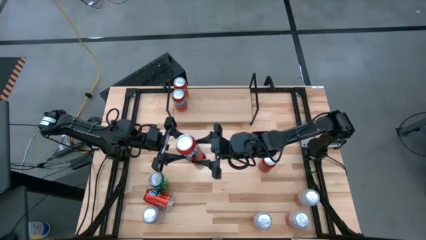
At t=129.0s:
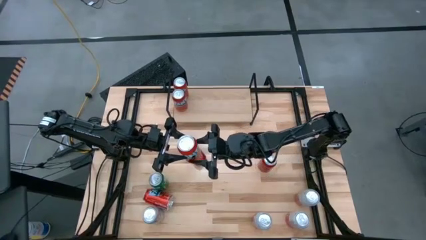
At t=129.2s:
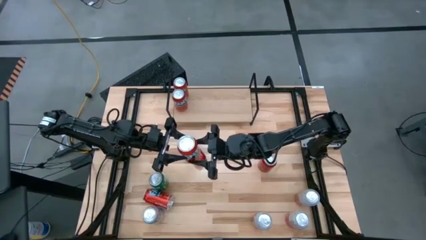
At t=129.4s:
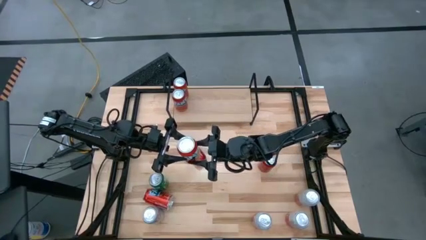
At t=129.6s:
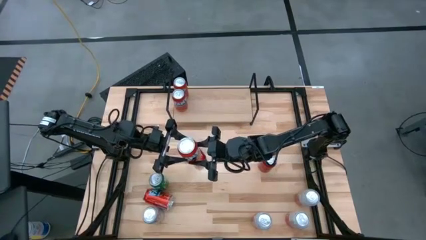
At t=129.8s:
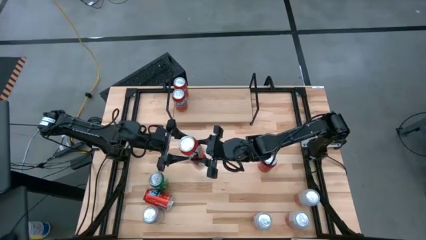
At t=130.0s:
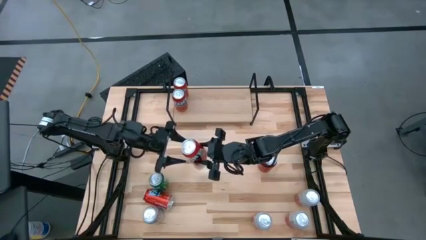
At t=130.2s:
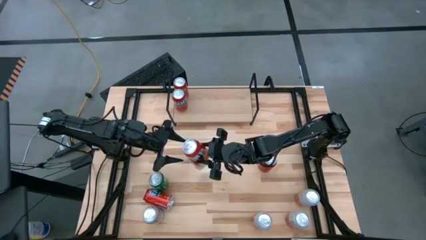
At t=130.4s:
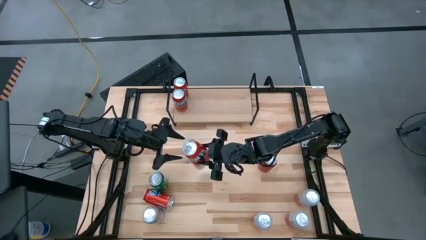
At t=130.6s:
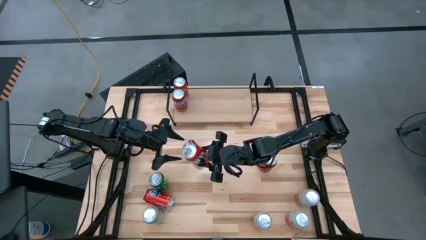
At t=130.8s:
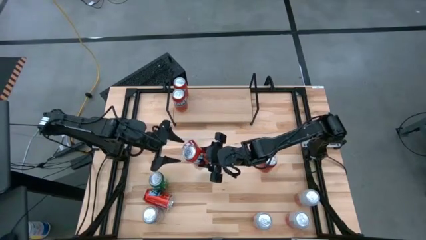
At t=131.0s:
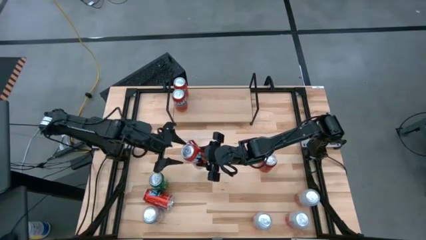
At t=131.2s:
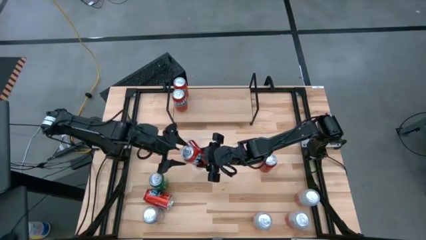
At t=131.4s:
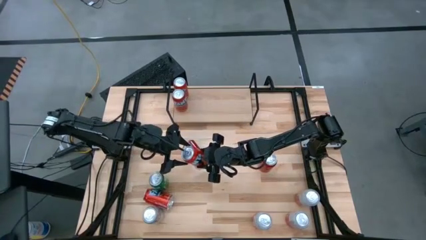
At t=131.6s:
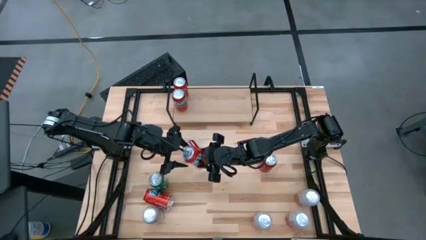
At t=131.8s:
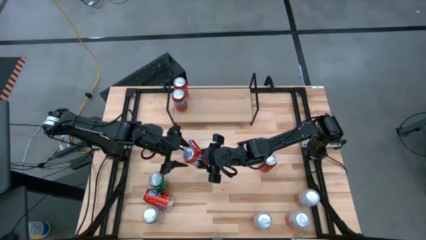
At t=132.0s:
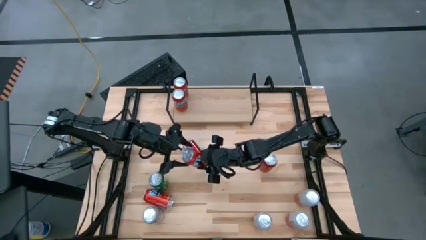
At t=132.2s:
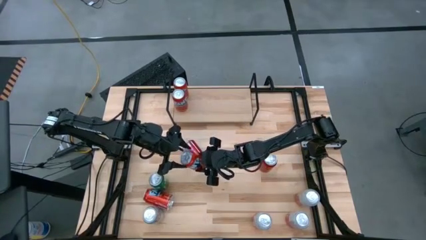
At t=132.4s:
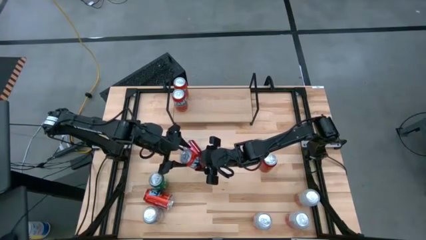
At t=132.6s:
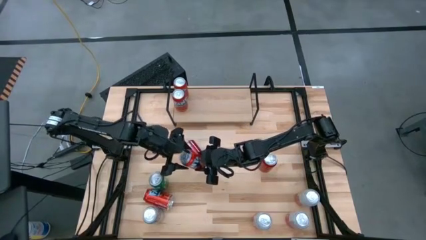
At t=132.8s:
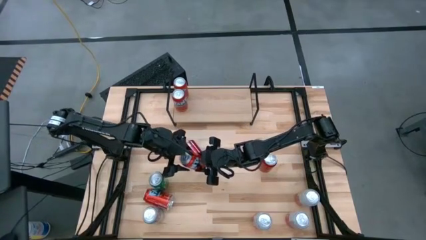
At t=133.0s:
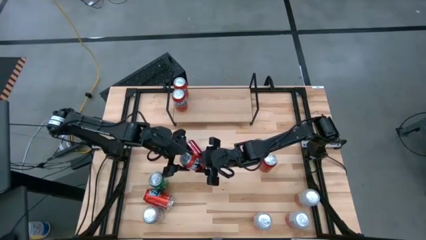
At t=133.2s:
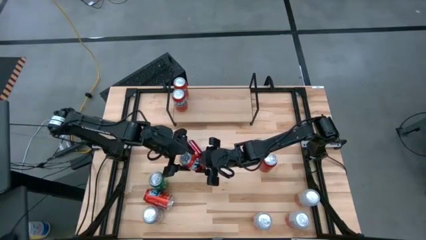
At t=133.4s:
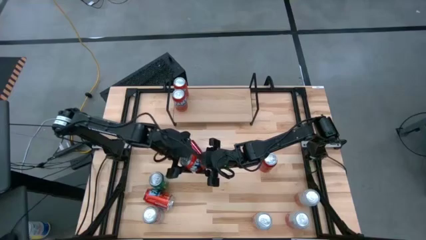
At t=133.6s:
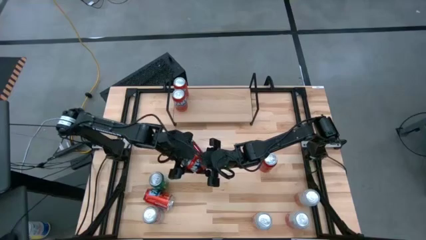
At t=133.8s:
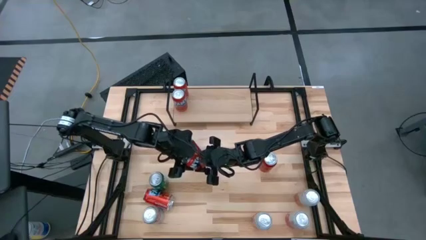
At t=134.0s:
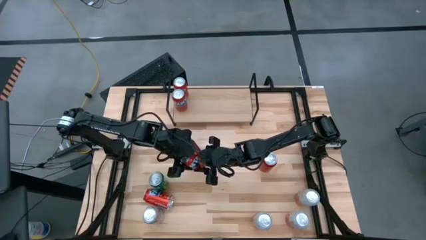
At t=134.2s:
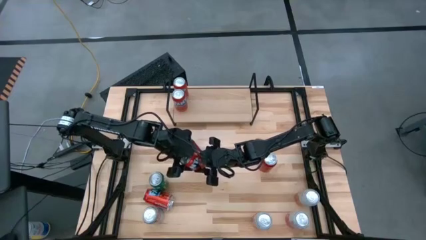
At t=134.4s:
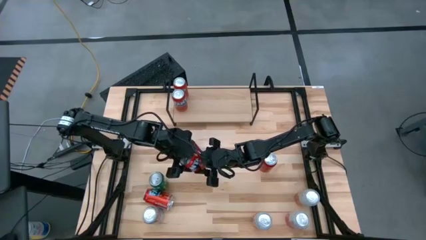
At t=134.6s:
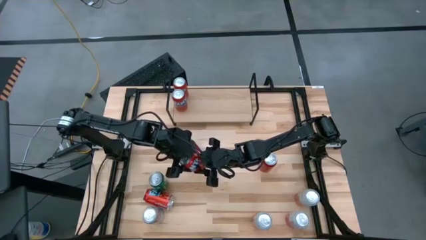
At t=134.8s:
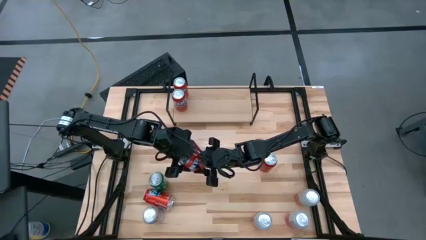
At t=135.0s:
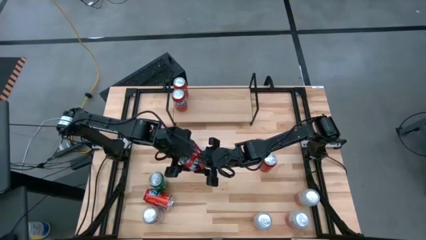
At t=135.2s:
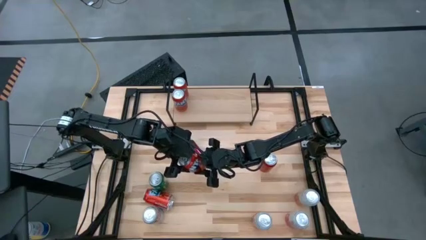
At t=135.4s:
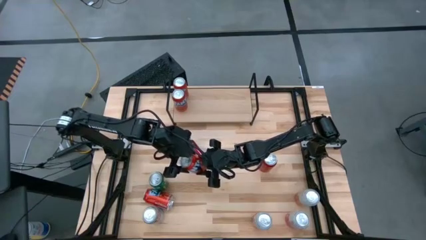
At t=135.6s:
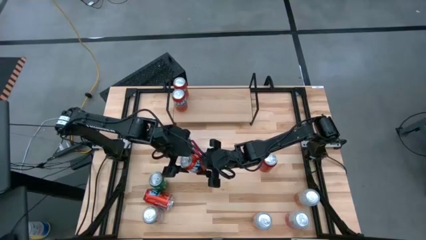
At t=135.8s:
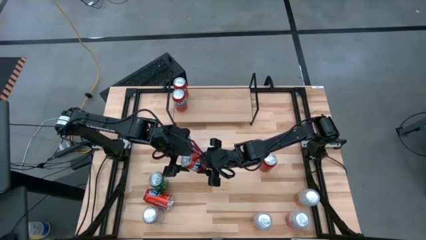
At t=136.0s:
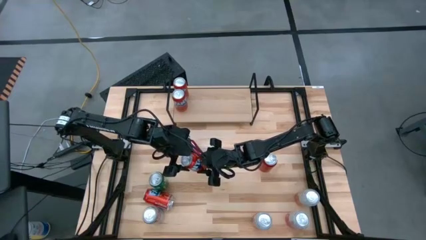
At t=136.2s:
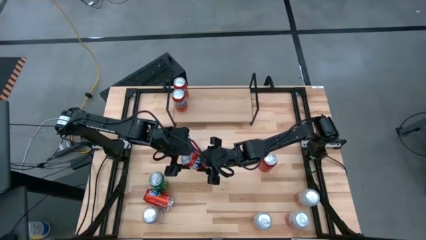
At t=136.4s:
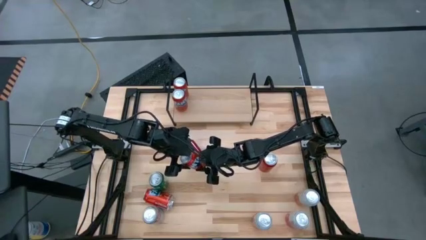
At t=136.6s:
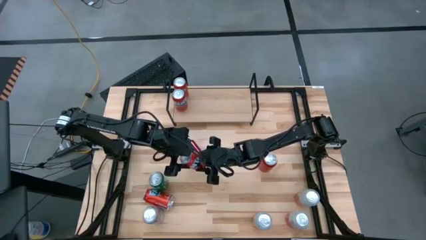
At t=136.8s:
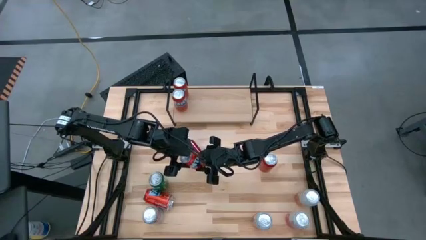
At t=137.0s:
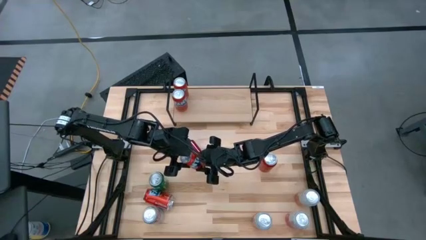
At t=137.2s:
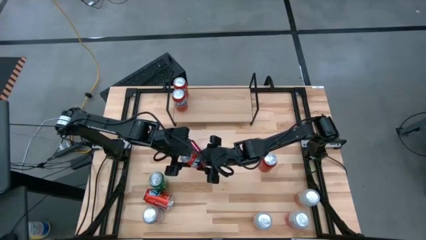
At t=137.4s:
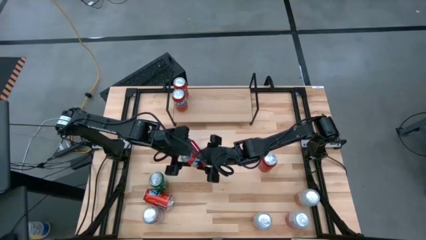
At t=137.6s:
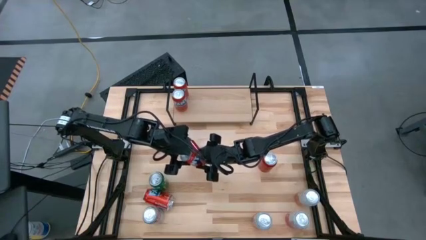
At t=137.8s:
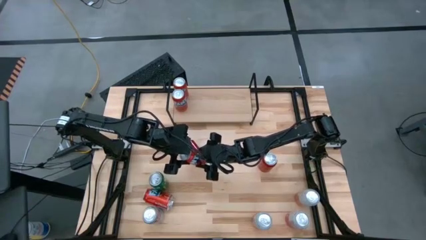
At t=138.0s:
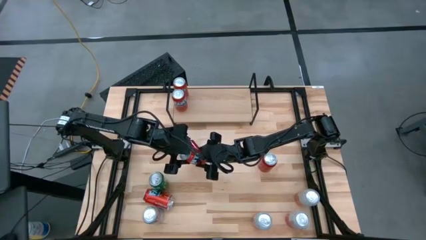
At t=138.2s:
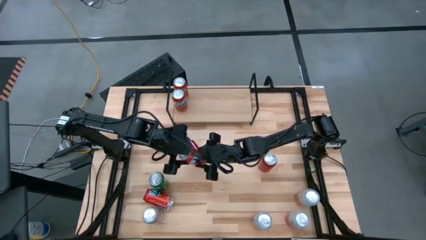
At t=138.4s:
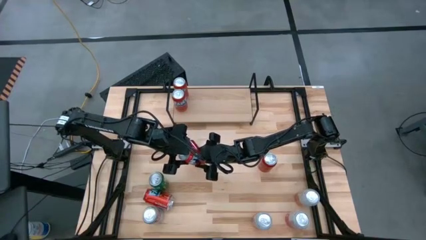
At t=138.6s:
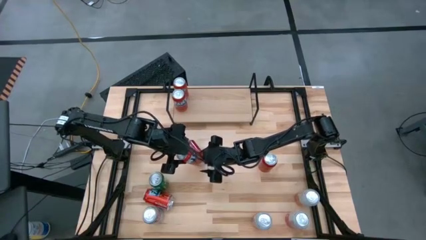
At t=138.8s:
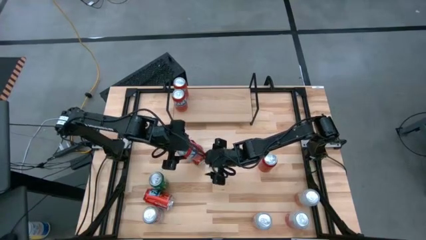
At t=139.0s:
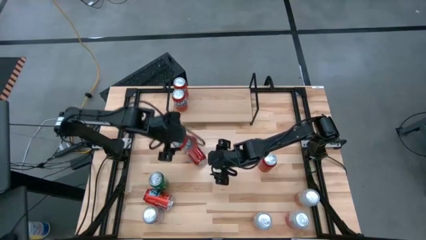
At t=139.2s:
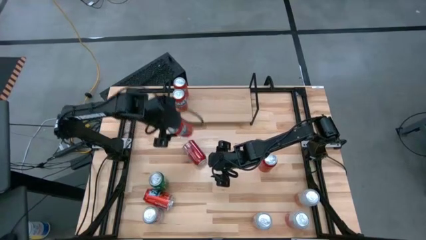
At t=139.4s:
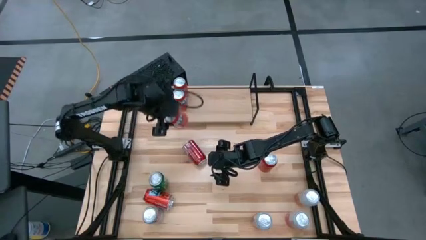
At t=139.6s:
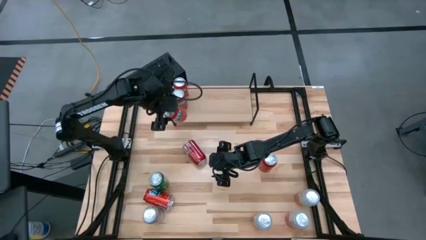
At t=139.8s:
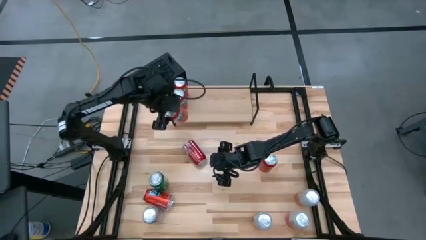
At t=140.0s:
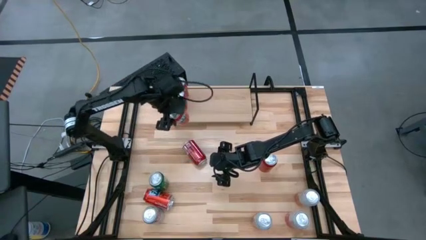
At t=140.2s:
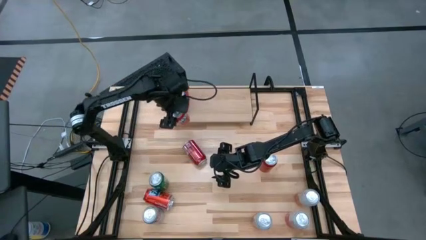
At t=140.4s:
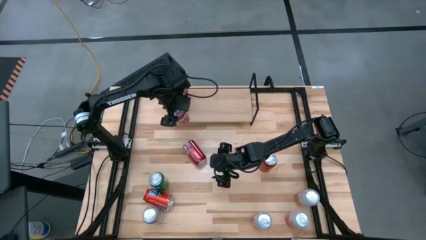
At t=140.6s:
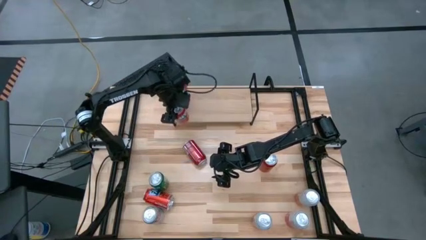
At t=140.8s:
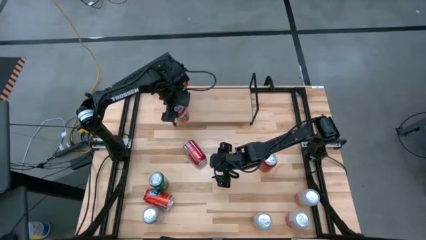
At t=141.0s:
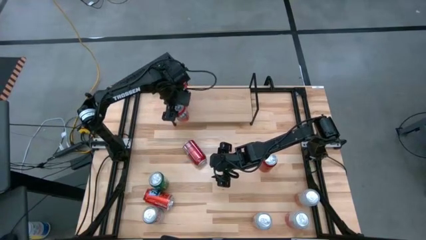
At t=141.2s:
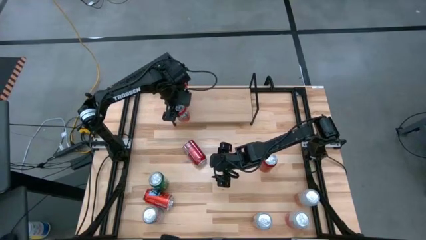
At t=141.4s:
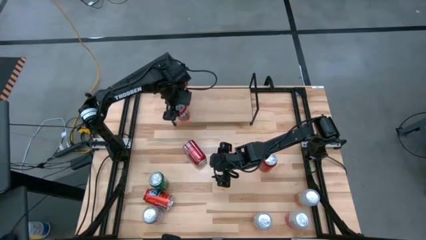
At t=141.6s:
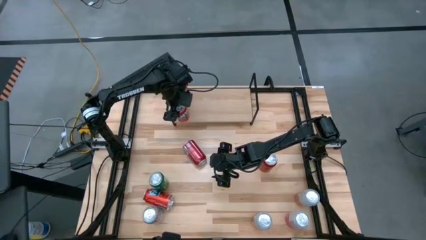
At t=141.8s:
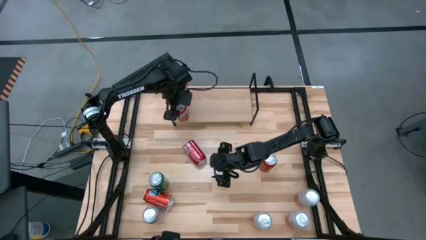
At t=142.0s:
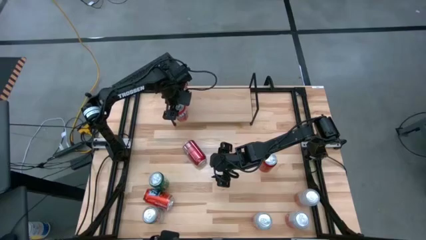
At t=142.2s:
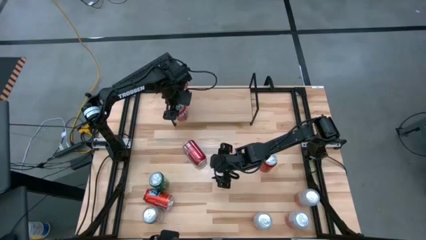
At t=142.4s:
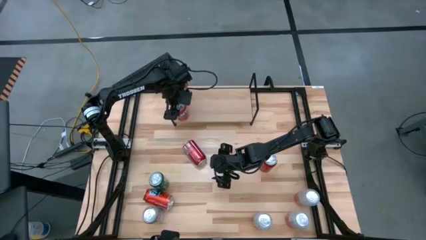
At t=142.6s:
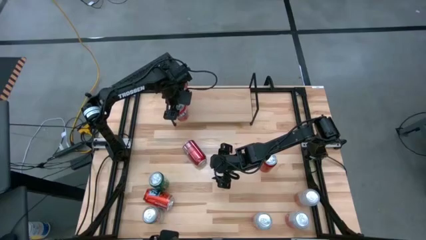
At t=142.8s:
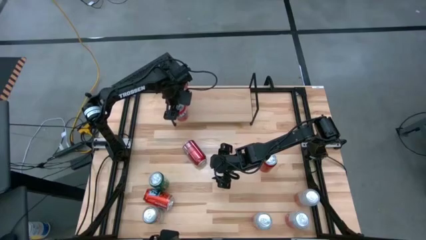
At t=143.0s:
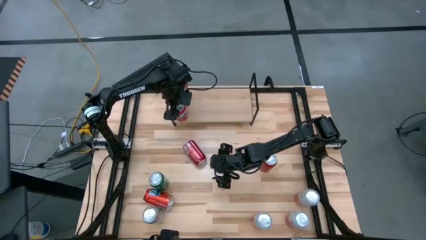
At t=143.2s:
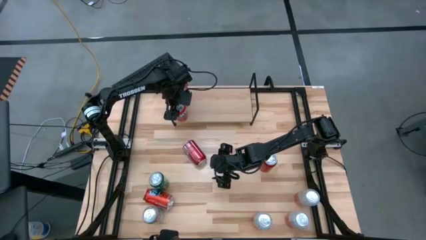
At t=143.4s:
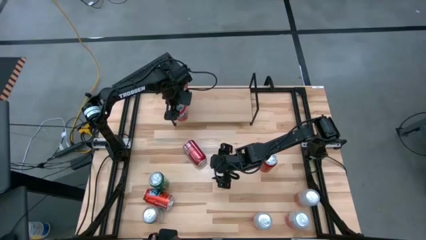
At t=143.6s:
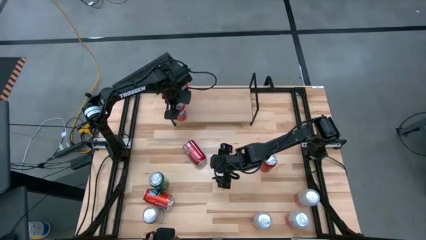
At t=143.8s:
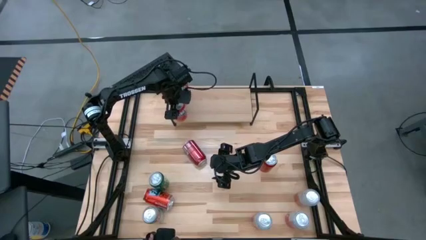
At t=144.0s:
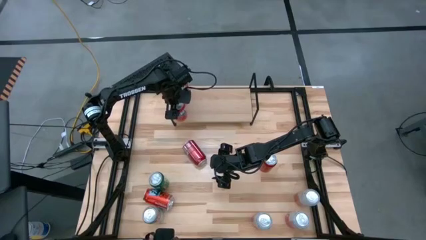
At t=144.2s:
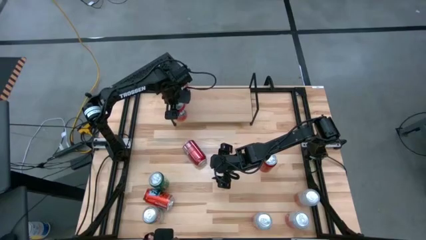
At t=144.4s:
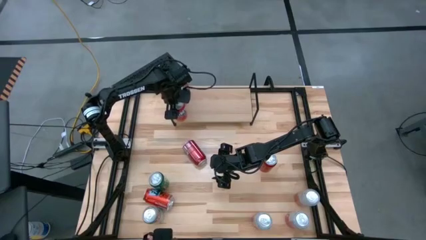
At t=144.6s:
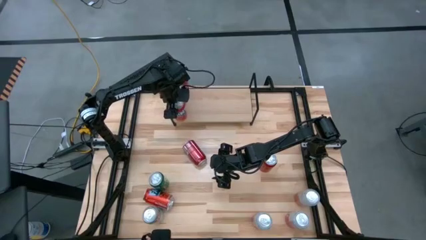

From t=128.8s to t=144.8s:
Task: Place canned beverage on shelf
Put the red soda can on the shelf and align with the other red soda cans
